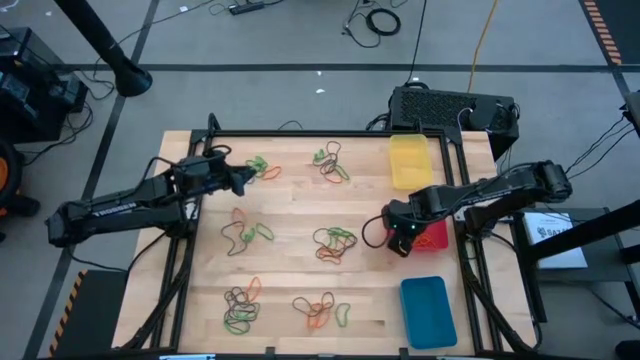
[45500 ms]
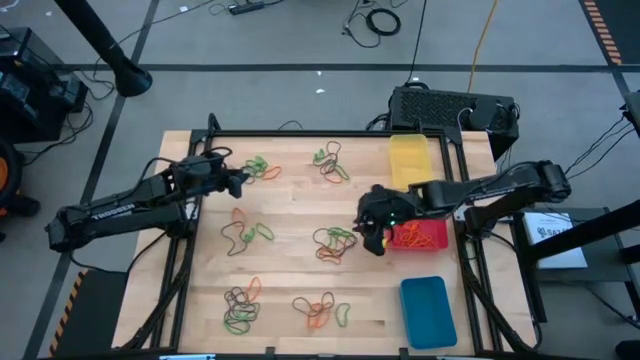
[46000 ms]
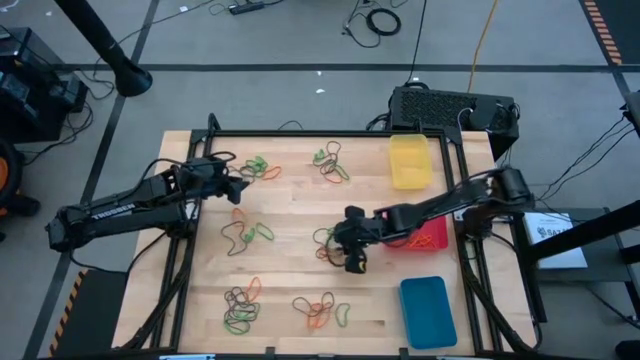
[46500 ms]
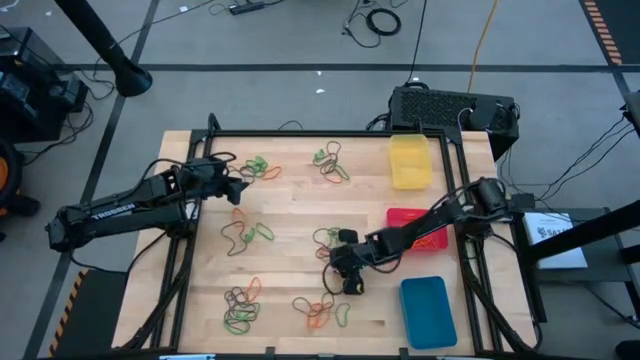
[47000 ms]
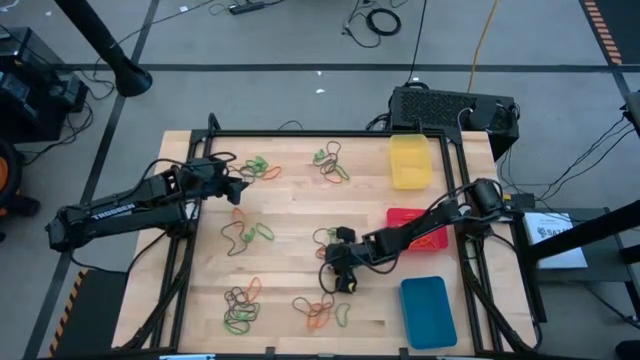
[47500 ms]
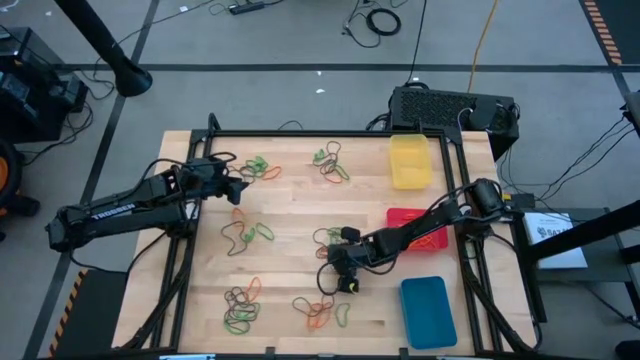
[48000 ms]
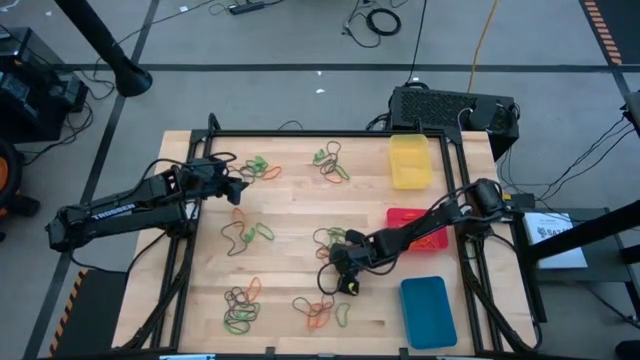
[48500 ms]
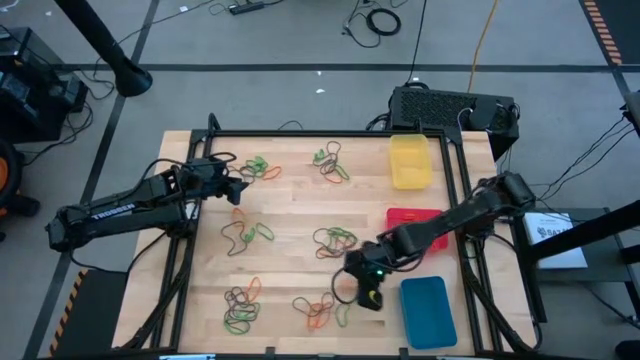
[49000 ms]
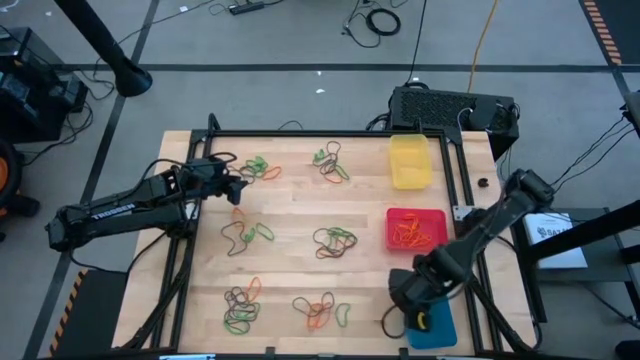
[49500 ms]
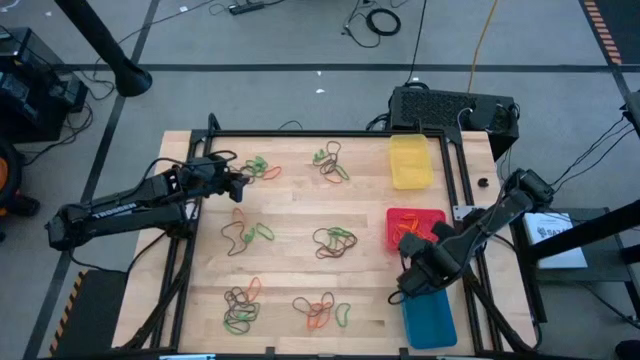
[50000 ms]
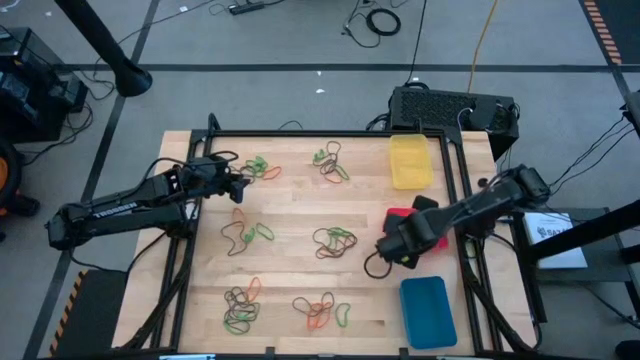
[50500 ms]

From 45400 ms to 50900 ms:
Task: Sort rubber bands into baskets
Put the orange rubber band into the red bin

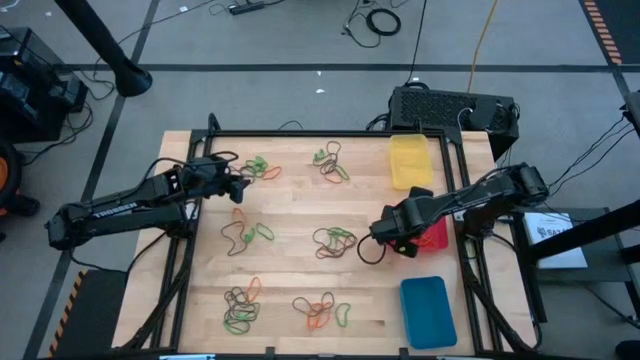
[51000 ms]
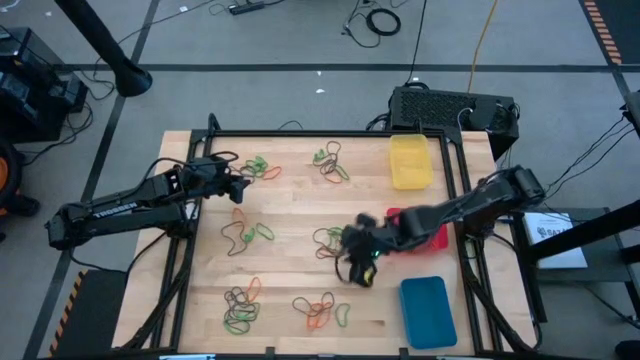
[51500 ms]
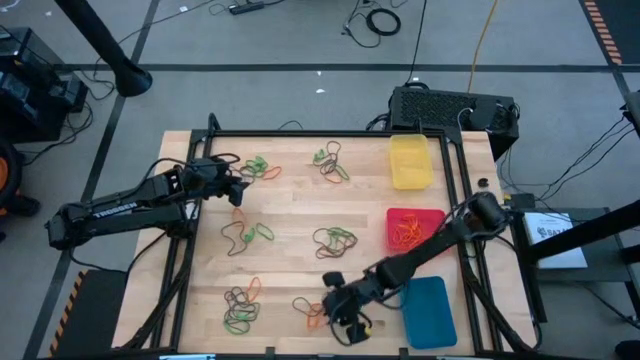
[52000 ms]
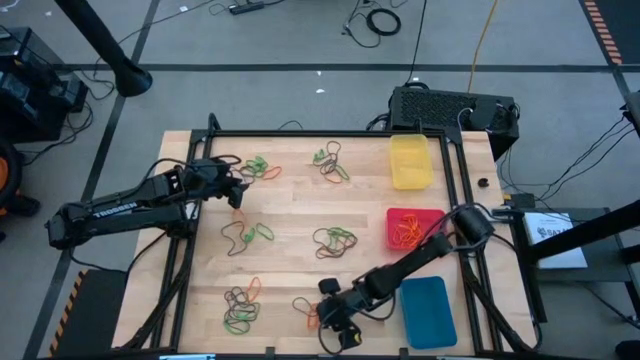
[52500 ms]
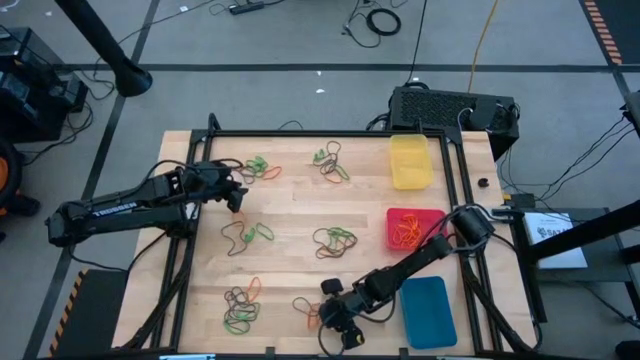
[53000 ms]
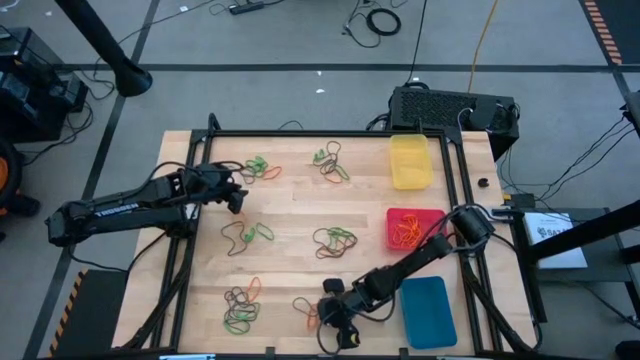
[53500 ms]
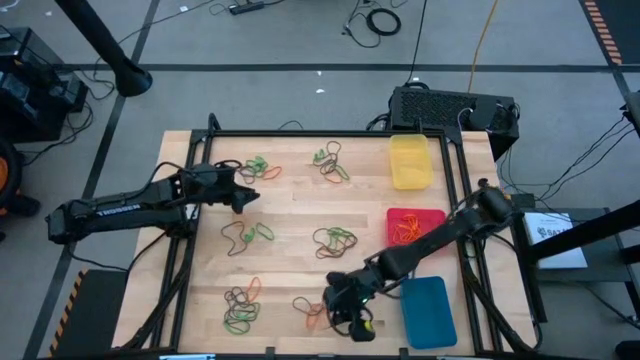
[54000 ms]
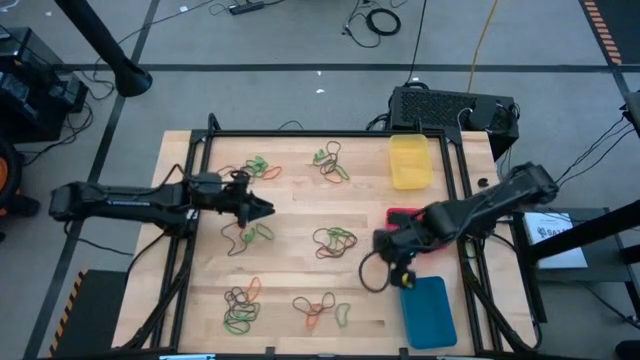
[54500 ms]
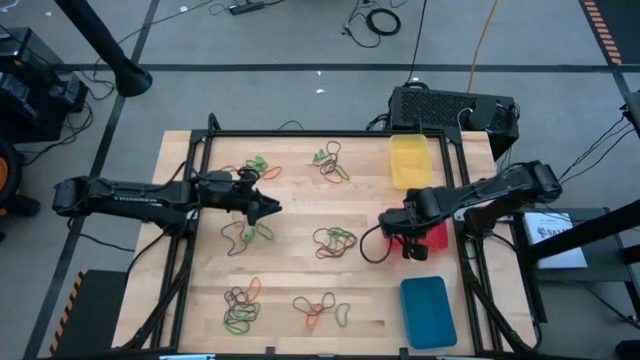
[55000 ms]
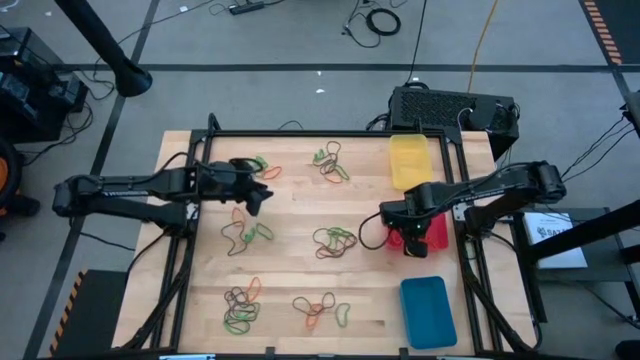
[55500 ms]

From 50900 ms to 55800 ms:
Put the orange rubber band into the red bin

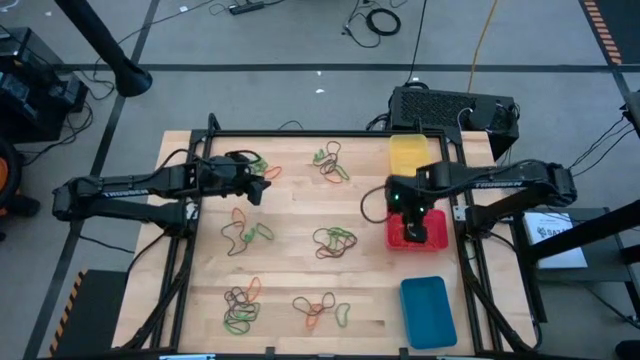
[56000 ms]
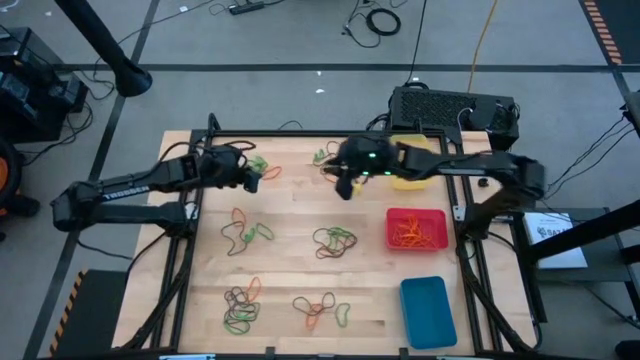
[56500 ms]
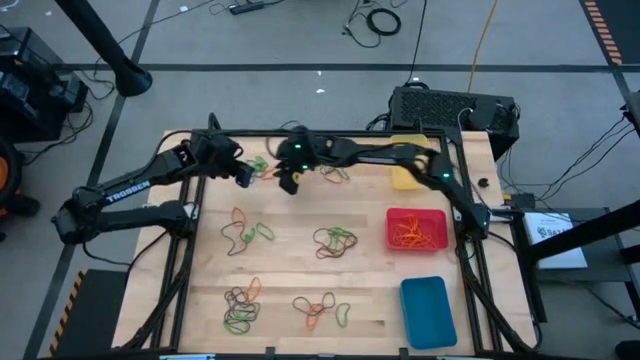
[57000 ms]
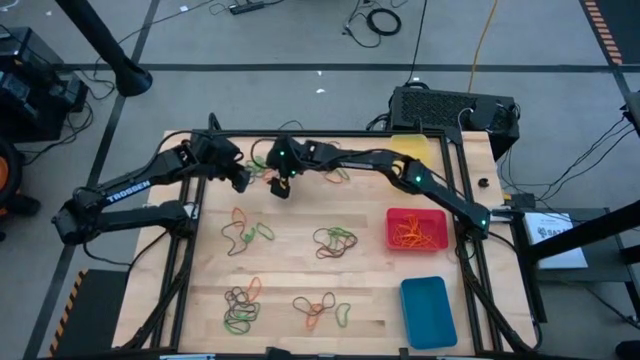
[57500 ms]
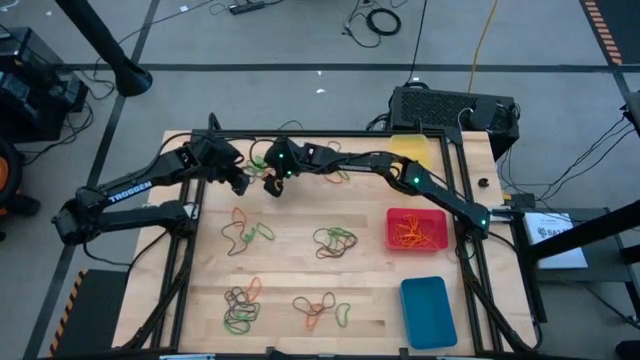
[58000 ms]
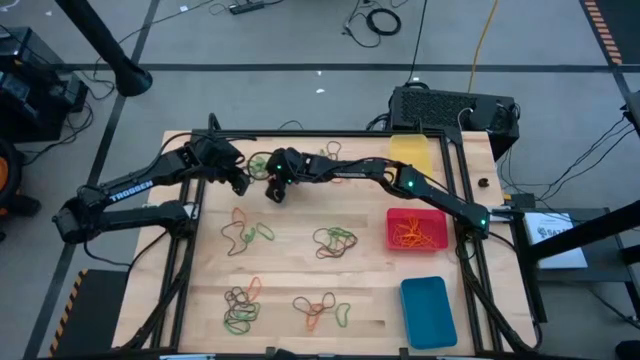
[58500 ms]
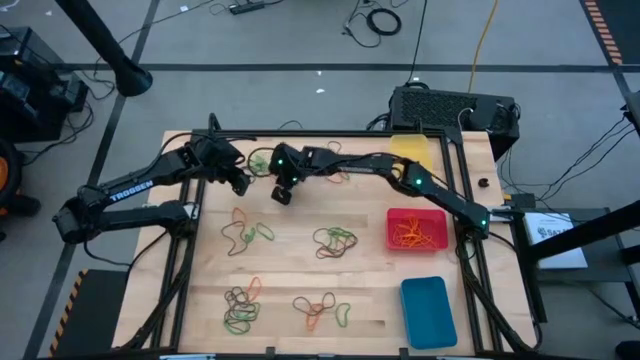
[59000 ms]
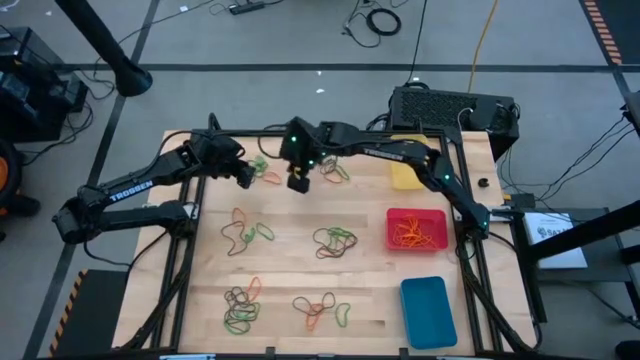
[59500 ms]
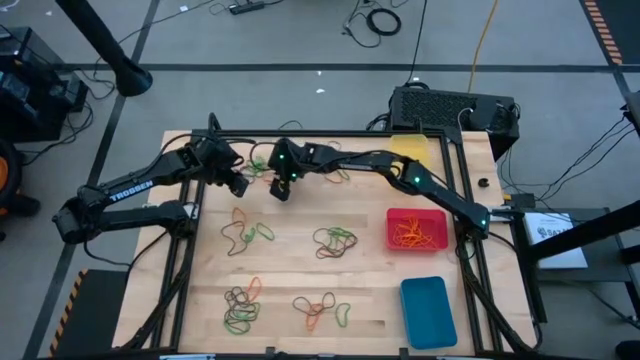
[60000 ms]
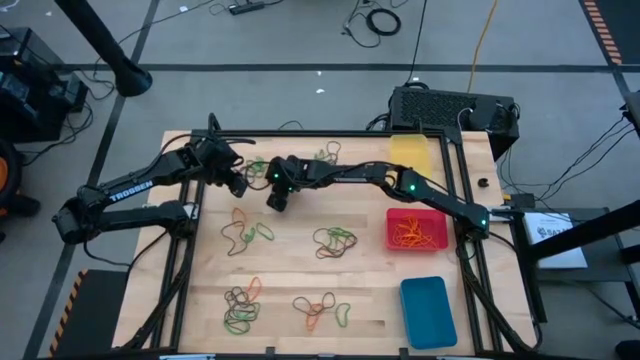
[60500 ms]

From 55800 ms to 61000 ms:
Put the orange rubber band into the red bin

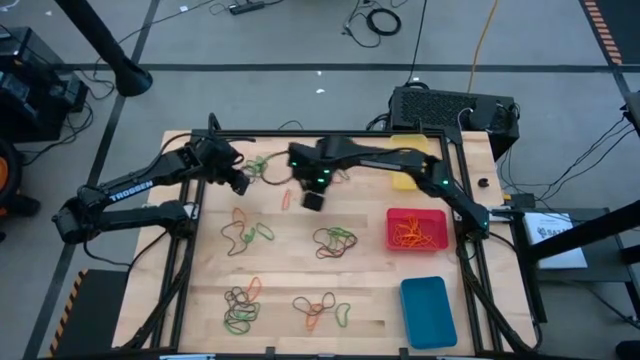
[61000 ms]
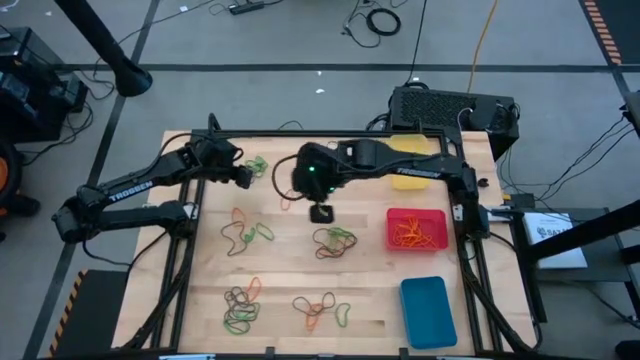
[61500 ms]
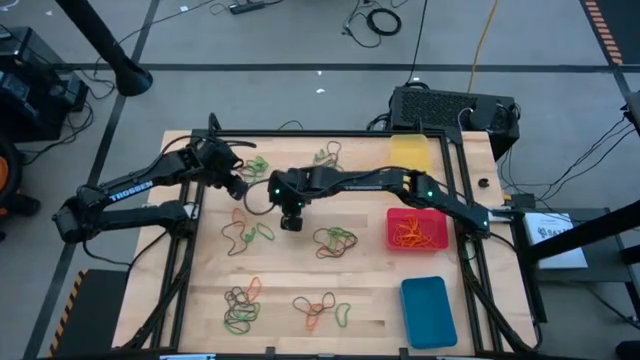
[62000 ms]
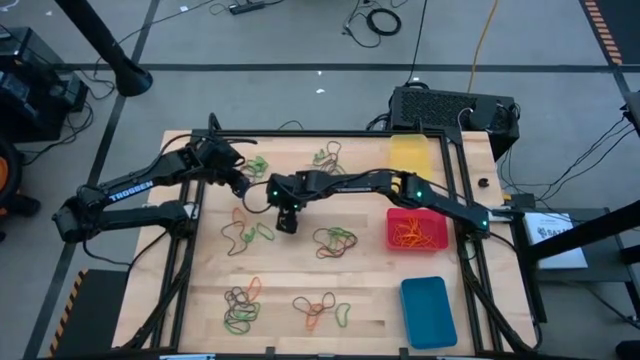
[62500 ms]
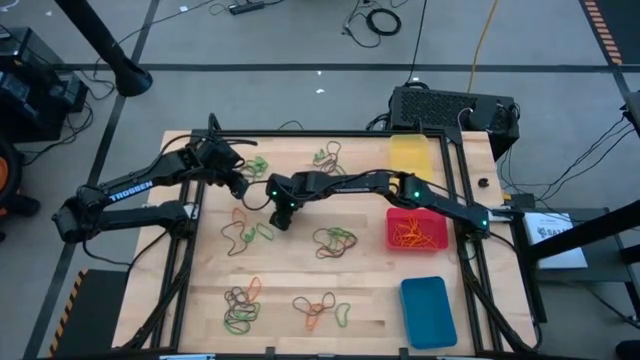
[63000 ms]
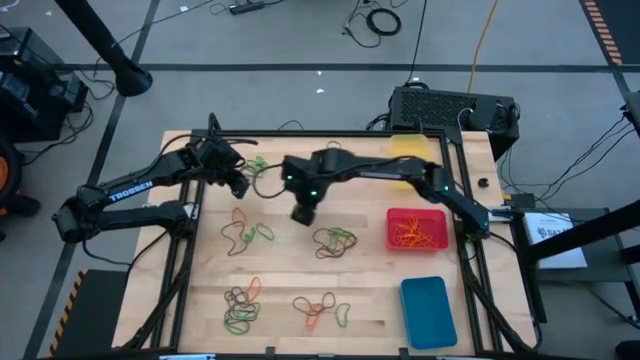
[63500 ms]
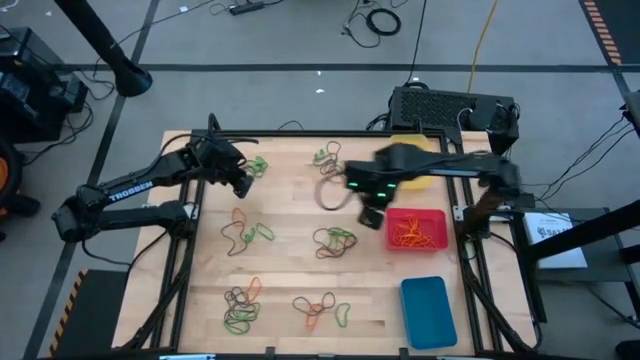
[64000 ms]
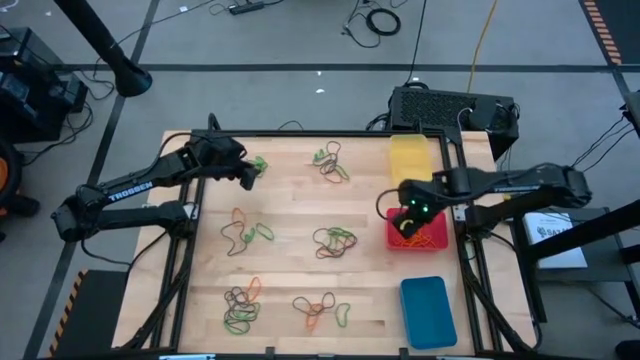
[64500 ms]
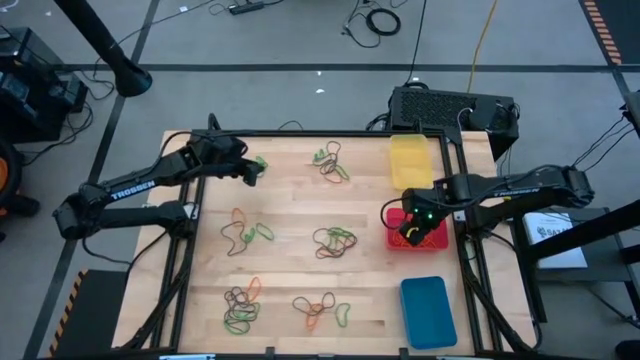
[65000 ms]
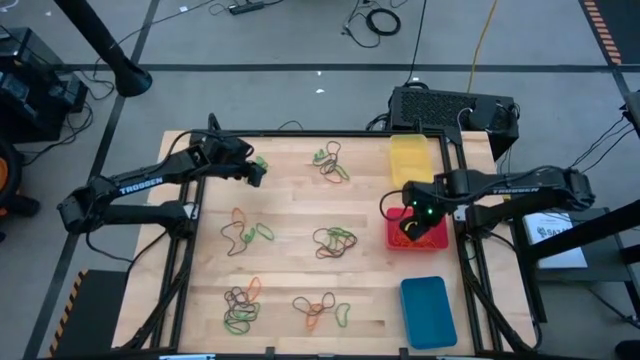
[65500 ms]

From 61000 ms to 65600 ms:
Put the orange rubber band into the red bin

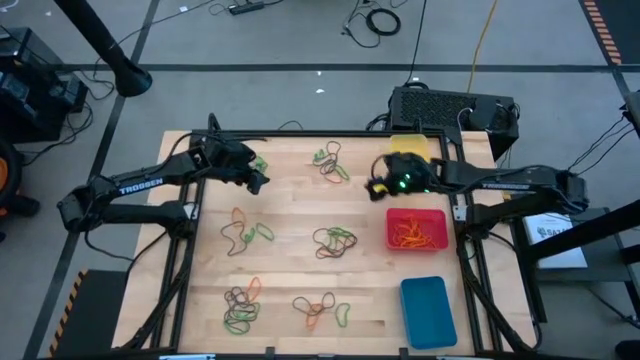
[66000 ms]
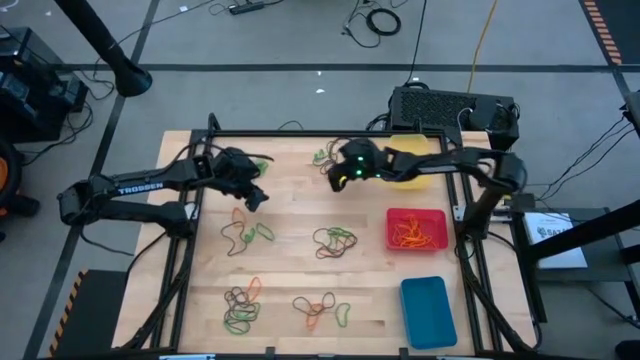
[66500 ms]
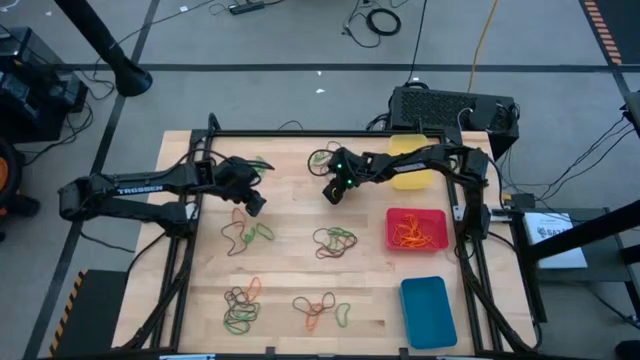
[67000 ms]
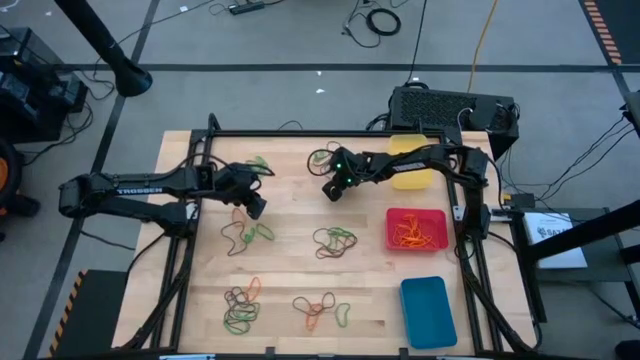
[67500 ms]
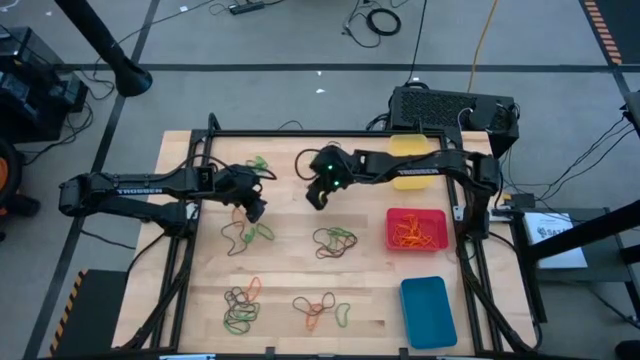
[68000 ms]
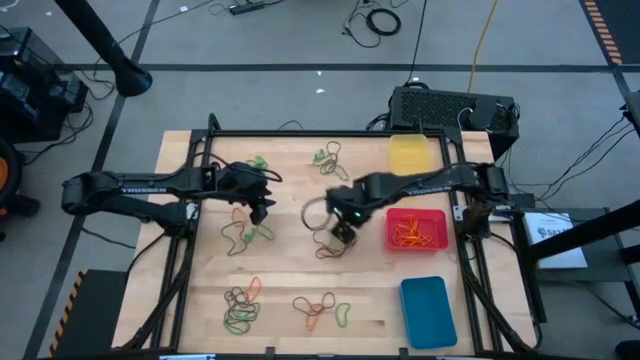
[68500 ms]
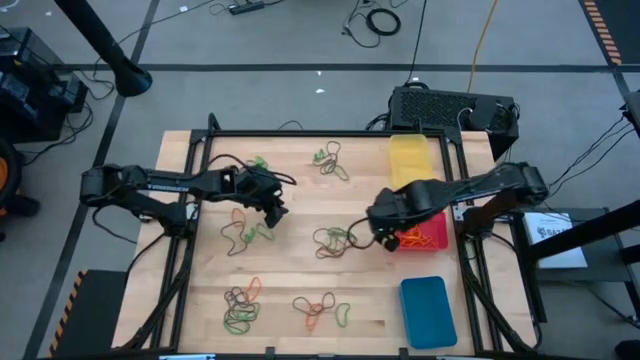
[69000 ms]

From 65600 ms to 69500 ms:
Put the orange rubber band into the red bin
